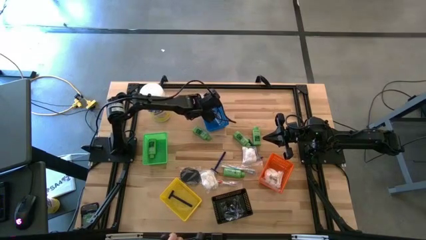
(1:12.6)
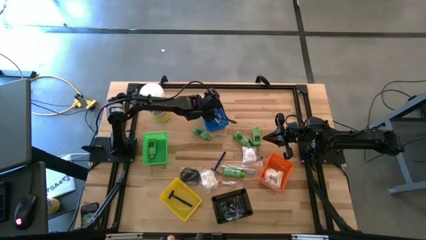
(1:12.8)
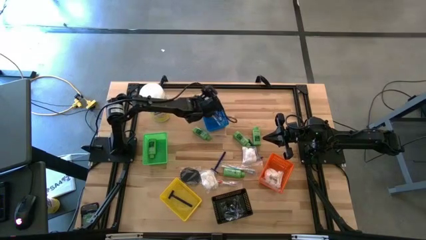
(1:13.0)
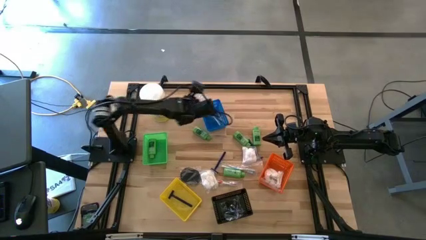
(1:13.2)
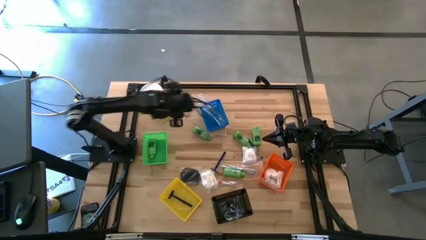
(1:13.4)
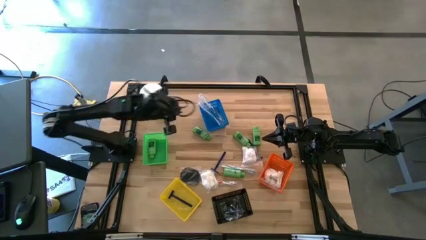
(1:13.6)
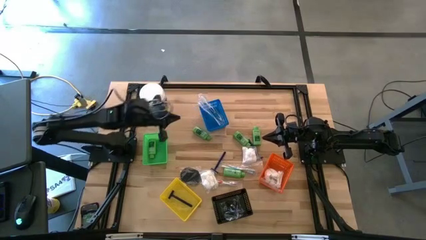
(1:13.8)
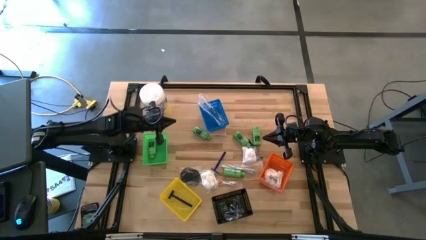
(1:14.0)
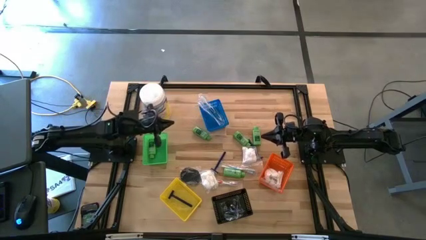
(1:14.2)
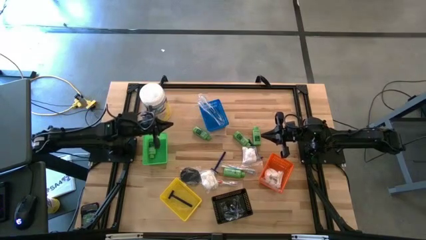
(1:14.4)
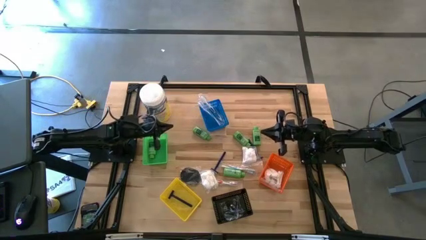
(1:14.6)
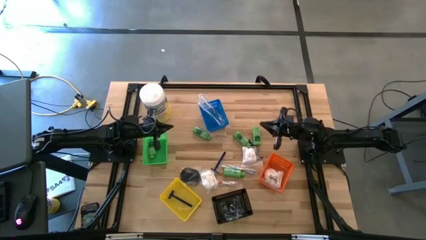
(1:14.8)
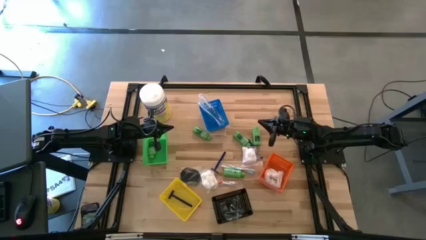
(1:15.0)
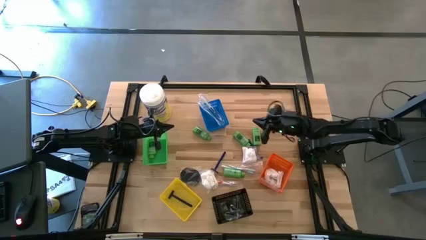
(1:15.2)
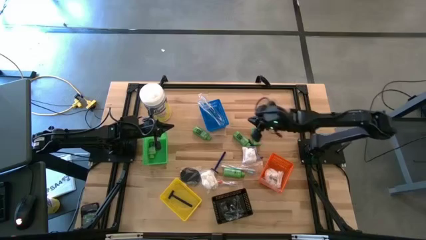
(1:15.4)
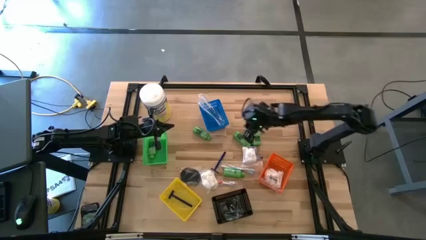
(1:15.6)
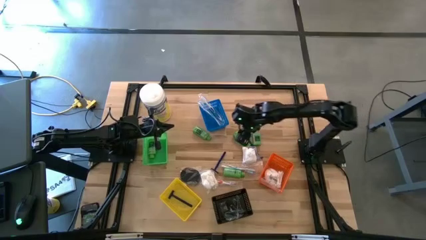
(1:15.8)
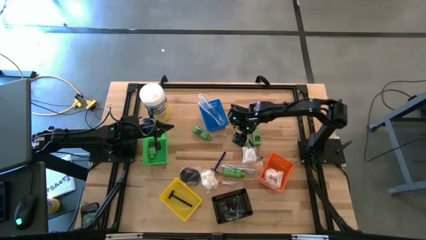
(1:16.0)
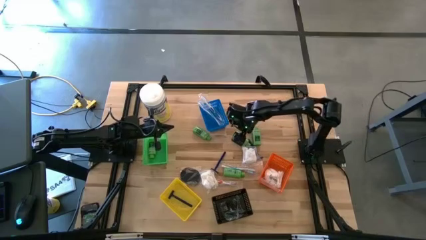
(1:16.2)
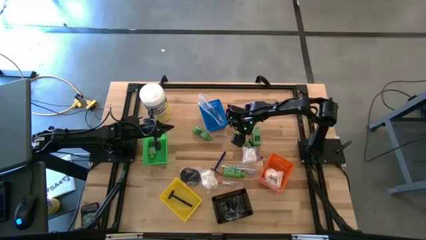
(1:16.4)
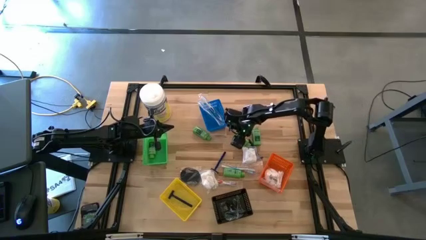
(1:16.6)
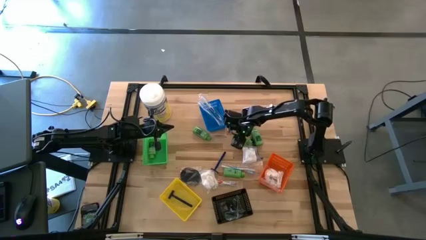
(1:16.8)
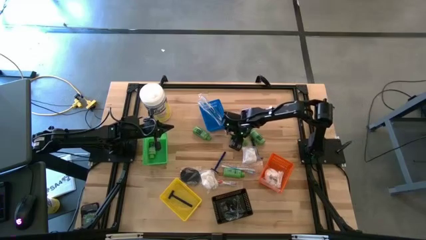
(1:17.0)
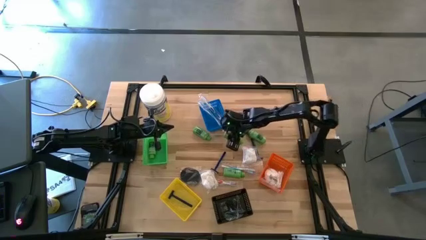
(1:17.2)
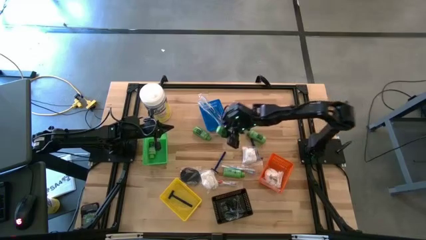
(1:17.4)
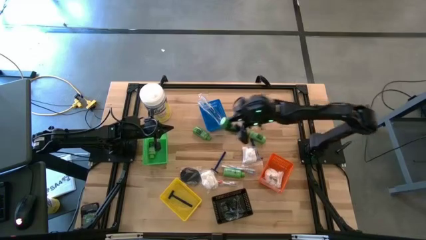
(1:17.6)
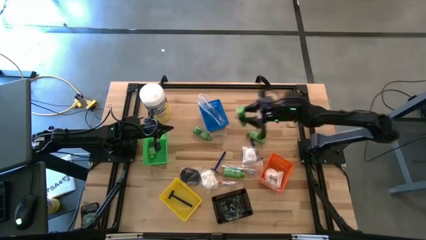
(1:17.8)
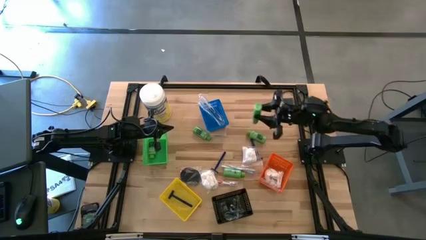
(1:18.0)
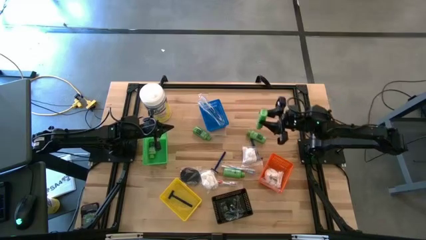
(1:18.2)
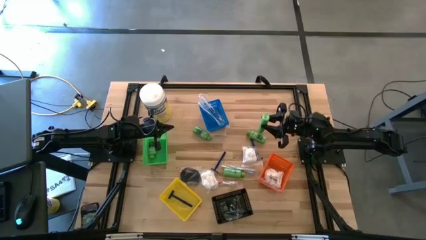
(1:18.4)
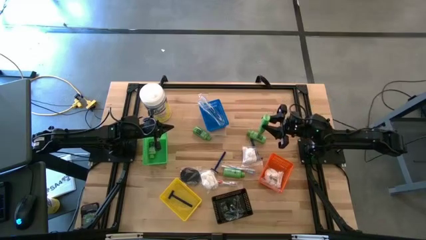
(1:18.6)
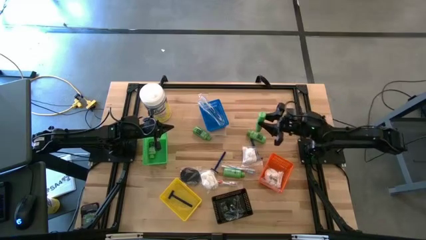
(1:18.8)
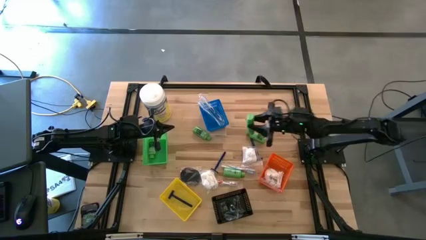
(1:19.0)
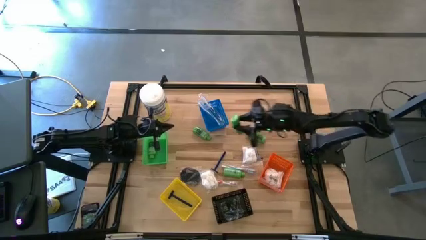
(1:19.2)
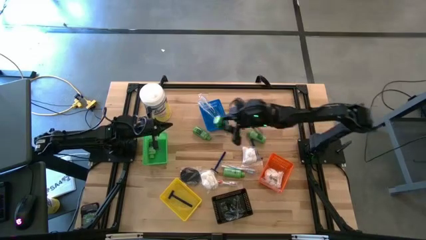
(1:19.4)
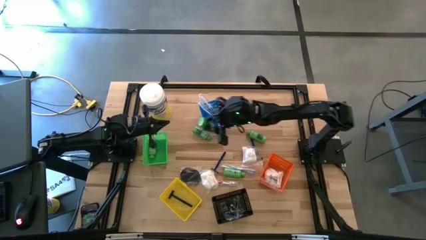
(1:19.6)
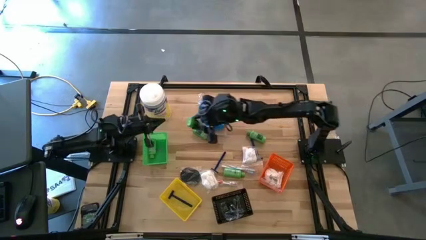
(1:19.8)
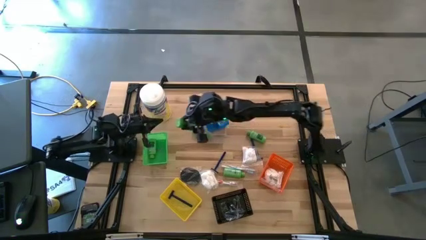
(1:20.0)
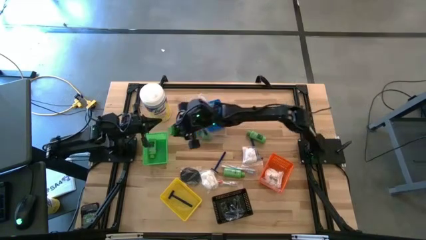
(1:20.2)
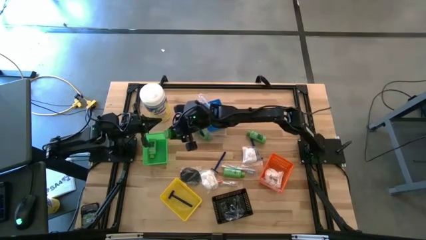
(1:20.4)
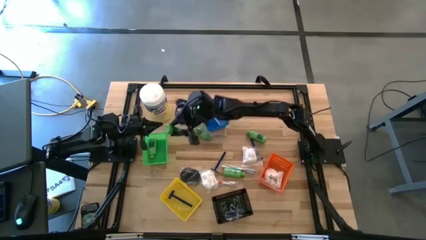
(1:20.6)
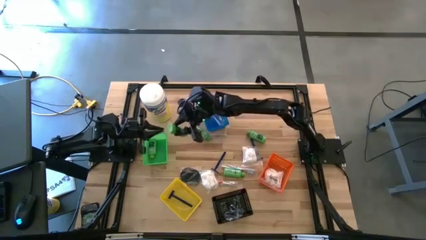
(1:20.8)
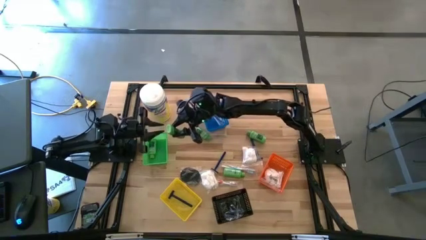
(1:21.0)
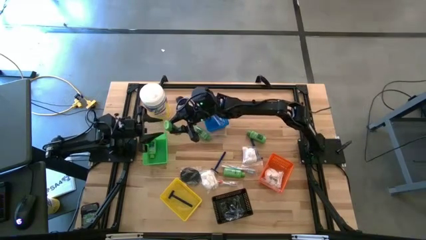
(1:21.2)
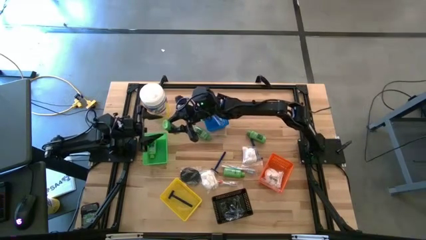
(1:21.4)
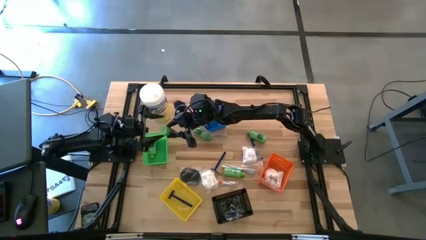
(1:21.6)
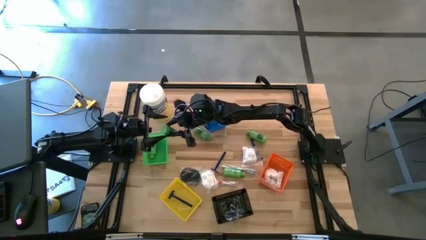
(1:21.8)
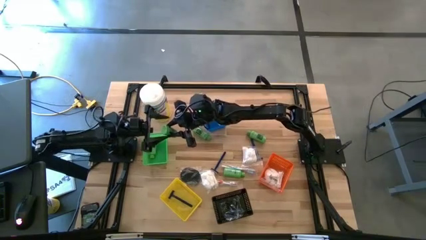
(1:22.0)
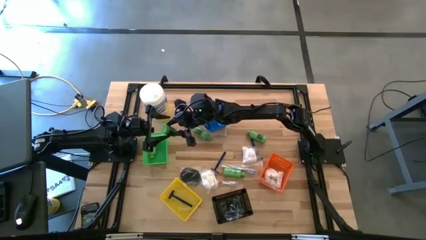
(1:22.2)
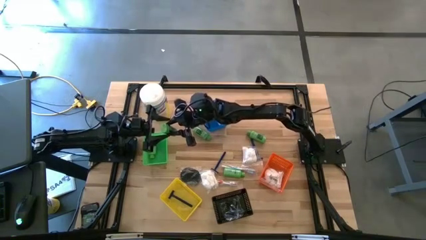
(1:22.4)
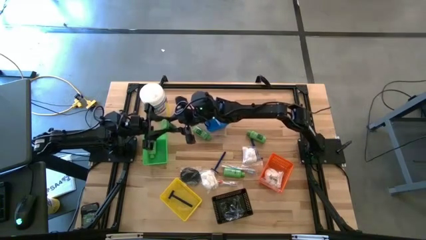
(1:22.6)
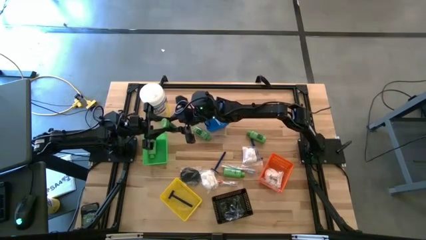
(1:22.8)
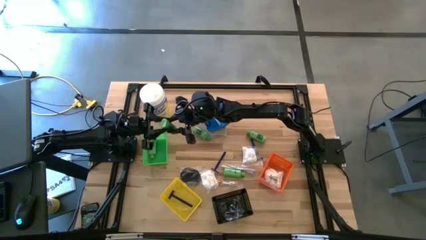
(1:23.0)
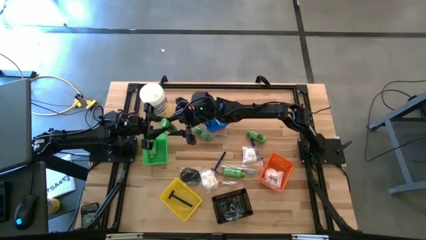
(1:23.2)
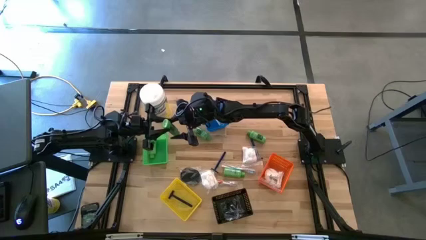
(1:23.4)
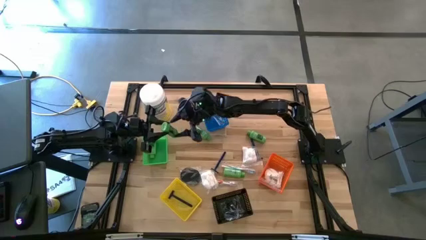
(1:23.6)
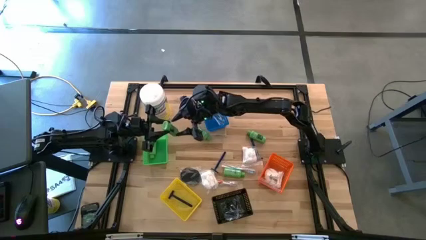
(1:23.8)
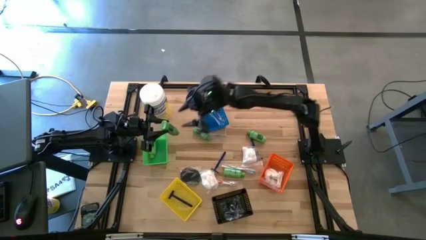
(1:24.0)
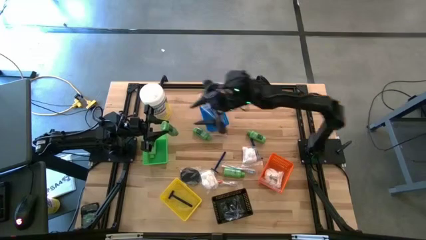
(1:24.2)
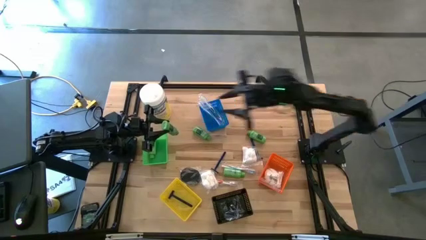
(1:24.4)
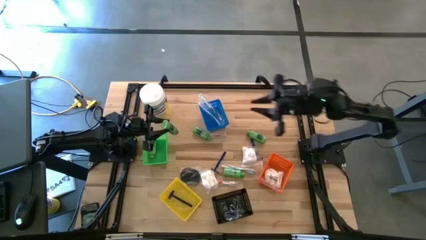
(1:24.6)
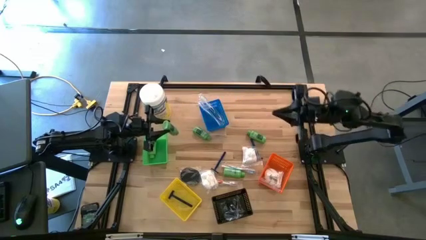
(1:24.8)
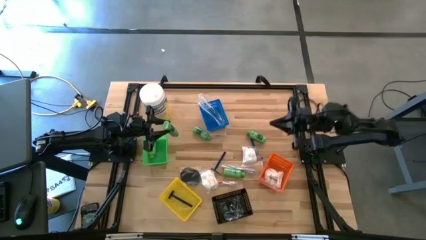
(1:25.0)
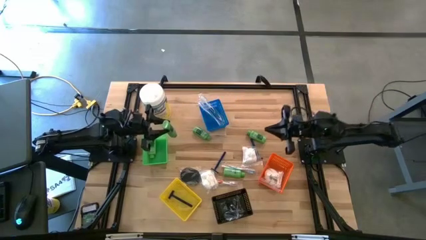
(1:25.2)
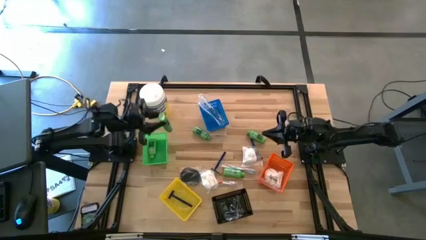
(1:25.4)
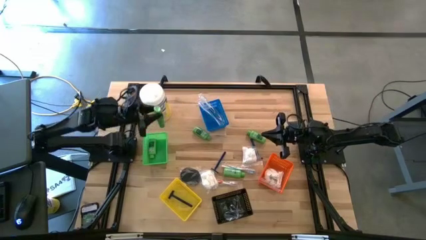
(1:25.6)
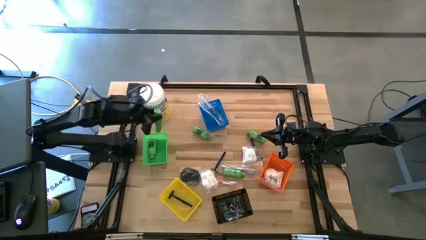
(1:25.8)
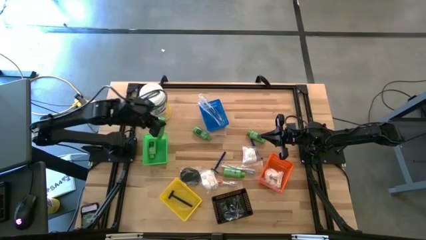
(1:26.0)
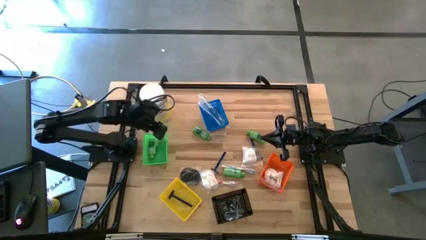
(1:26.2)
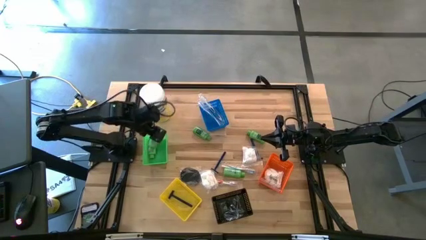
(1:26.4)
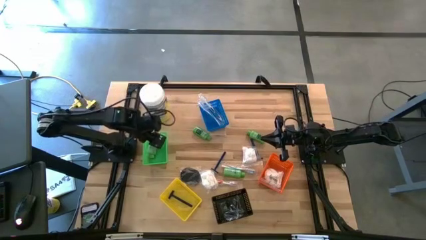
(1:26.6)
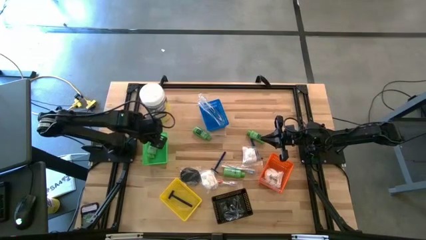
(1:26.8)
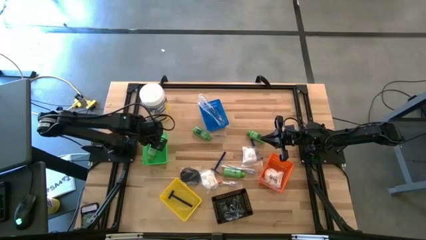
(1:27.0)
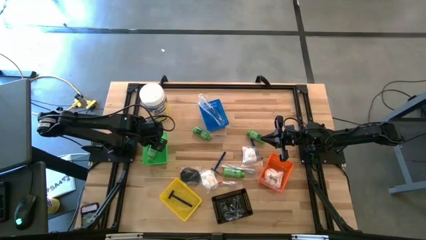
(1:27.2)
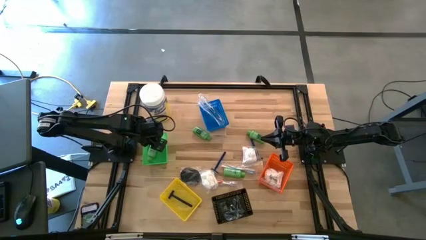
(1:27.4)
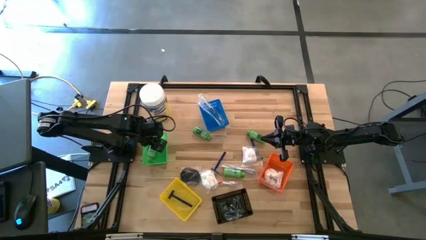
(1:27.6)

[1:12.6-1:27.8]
Task: Pick & Place Travel size toiletries
Put the green shampoo into the green bin
